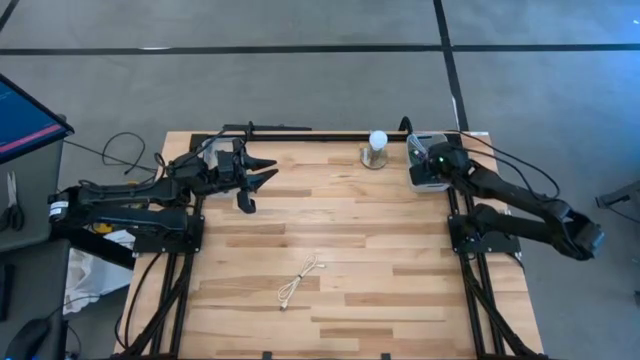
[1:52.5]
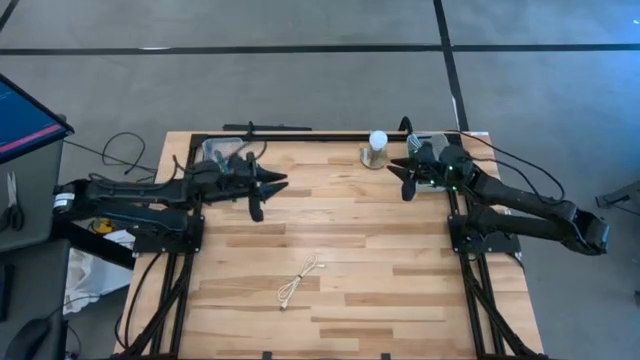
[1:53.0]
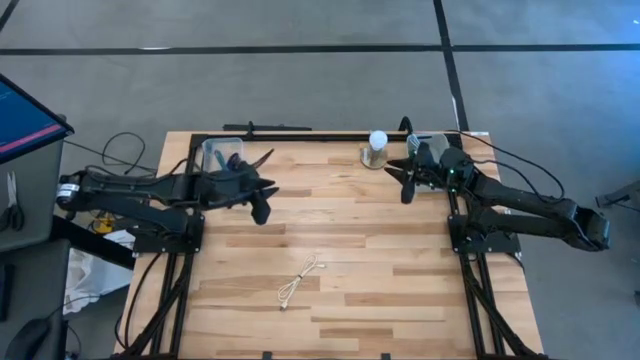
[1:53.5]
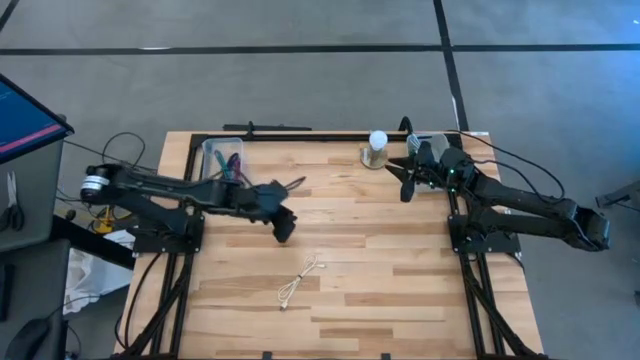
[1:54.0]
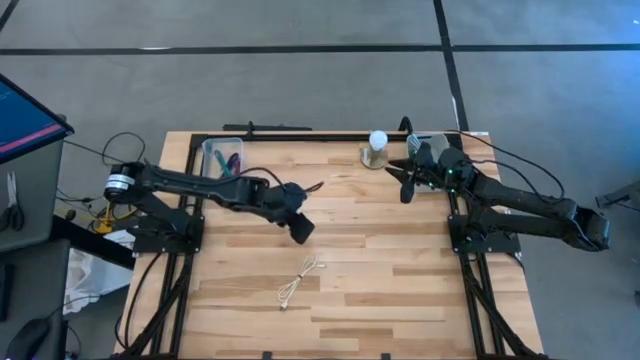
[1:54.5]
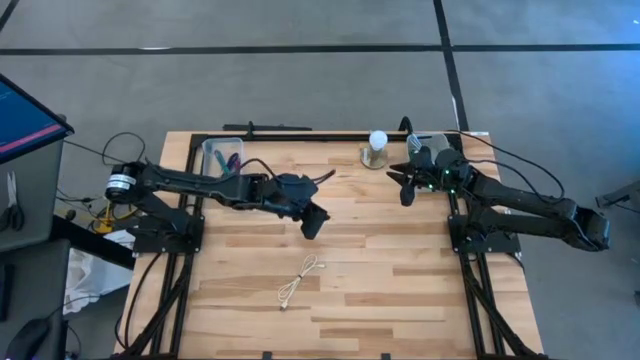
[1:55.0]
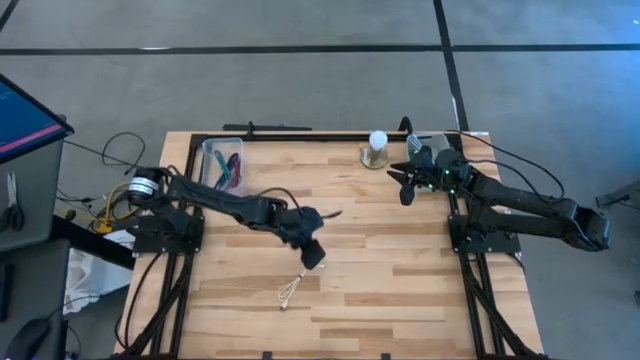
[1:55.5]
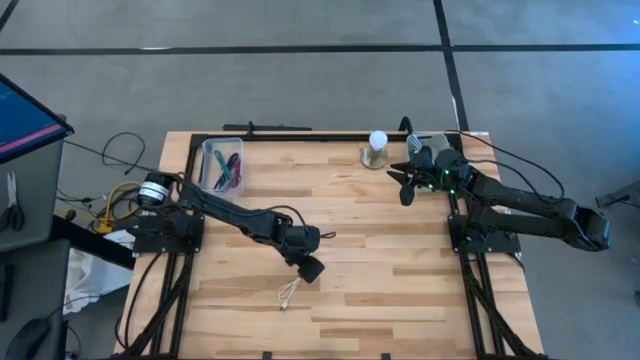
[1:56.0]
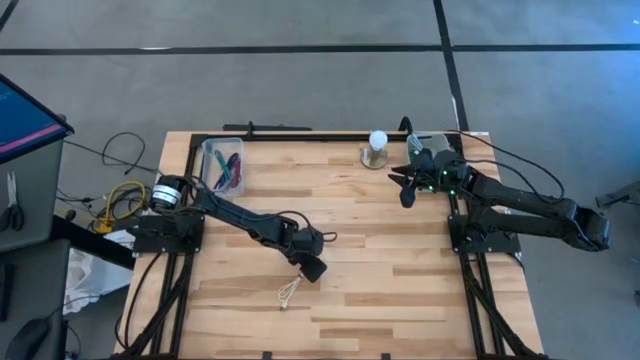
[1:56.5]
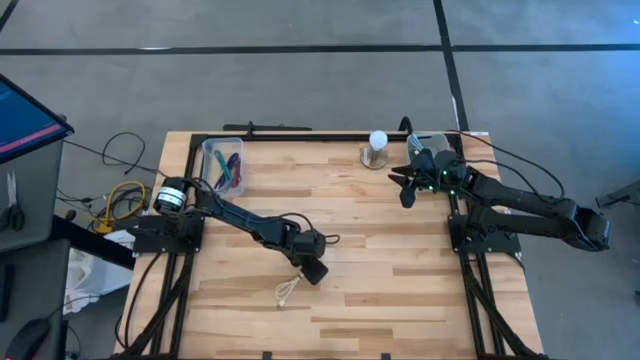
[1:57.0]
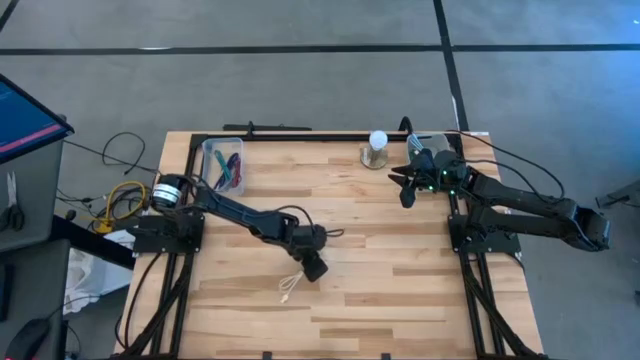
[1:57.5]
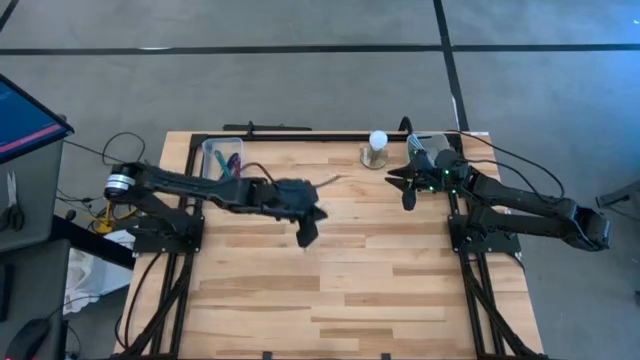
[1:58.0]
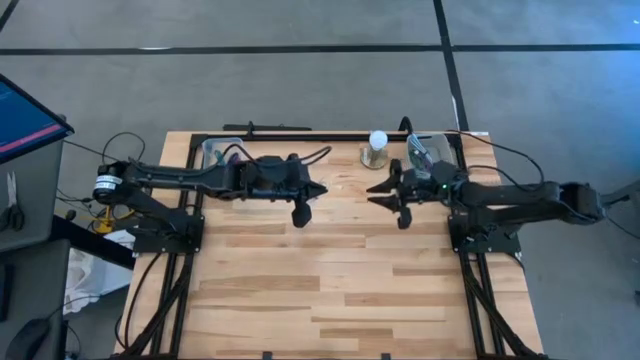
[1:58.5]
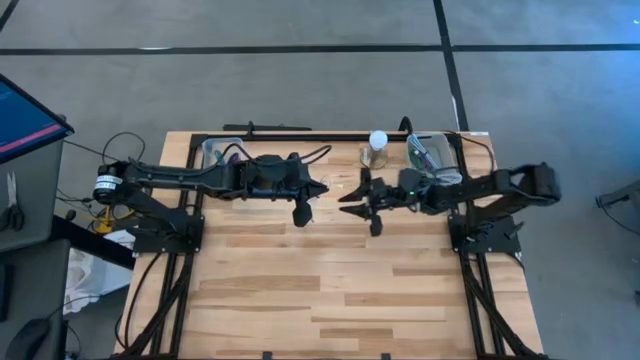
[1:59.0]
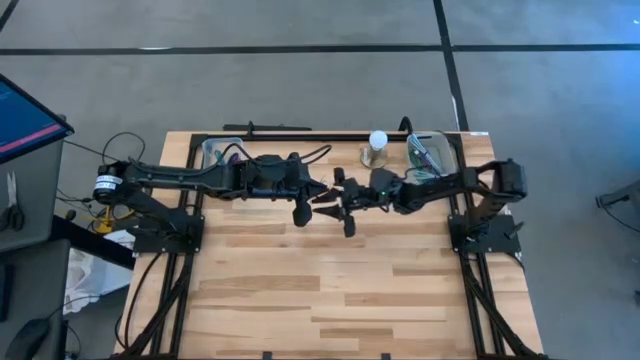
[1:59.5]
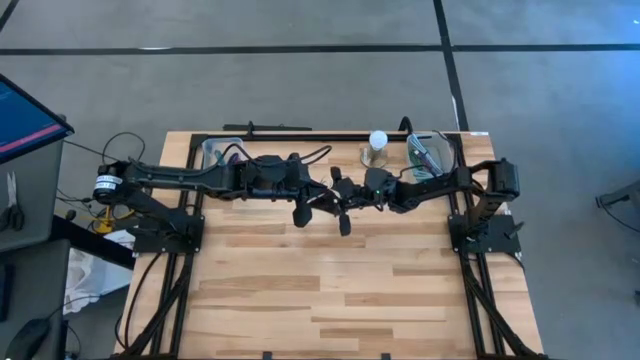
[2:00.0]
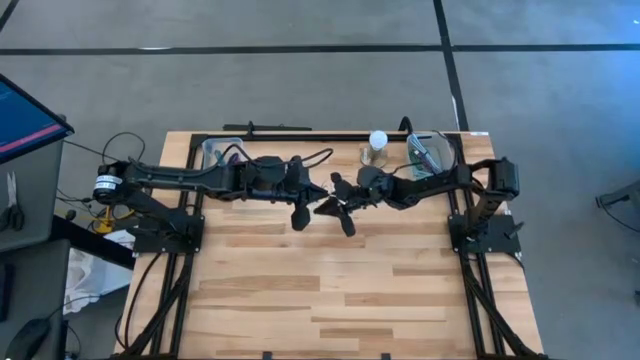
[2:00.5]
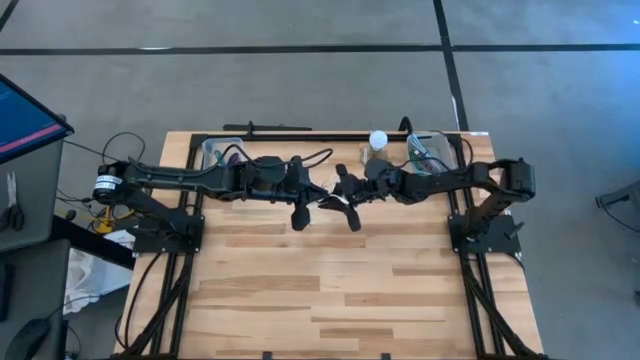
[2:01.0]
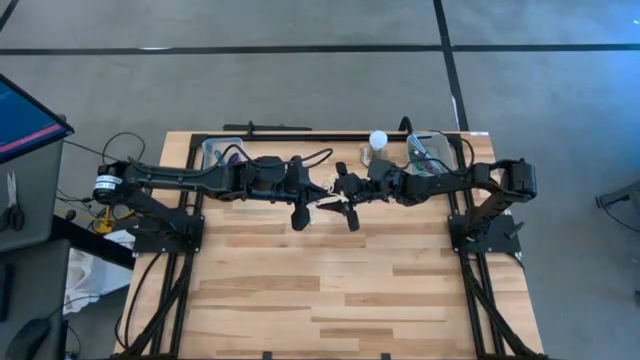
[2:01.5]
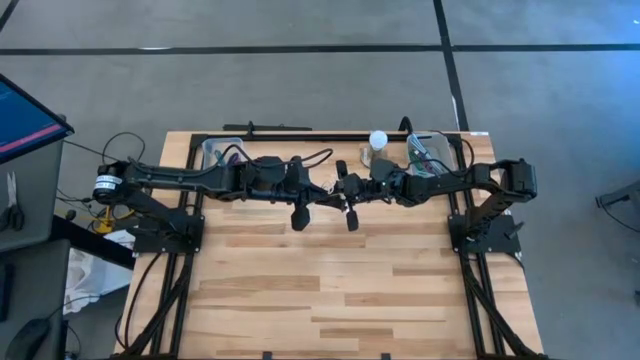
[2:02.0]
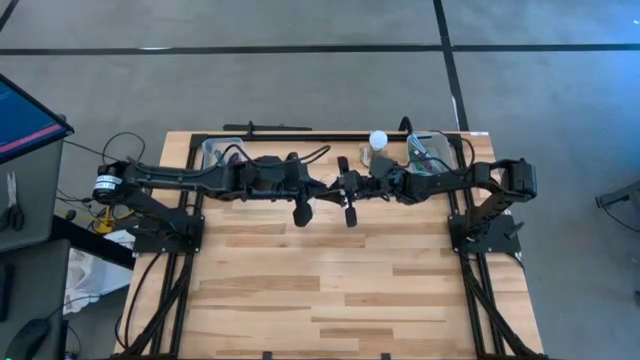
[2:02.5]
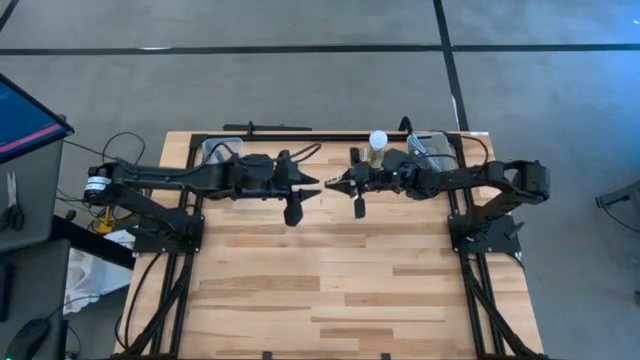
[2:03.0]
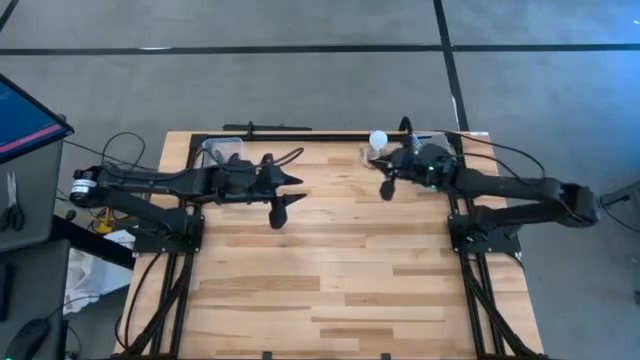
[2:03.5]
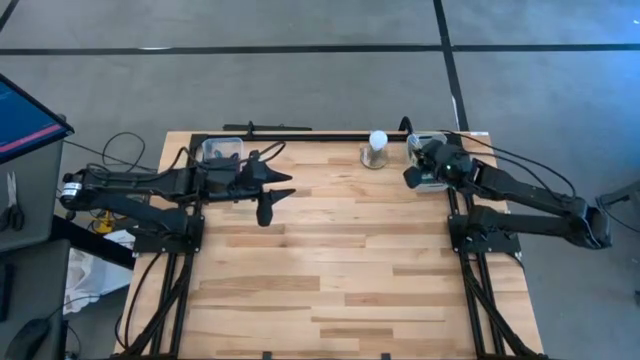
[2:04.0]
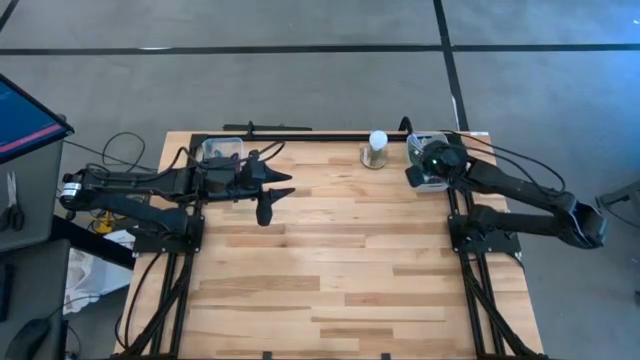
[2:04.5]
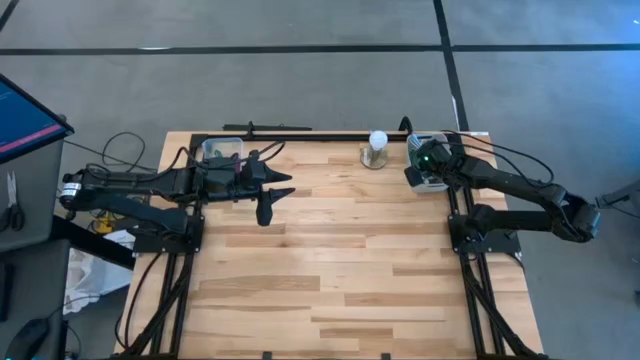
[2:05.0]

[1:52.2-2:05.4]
Task: Pick & Place USB Port
Put the white charger cable into the gray bin

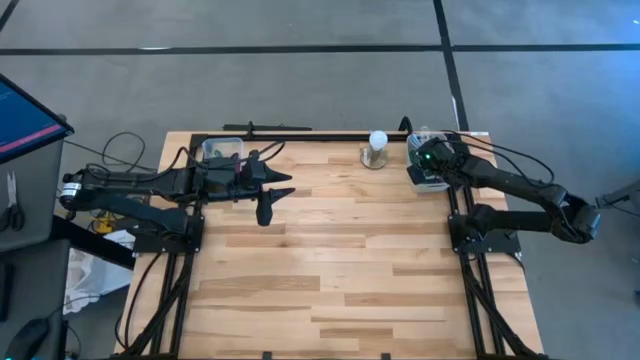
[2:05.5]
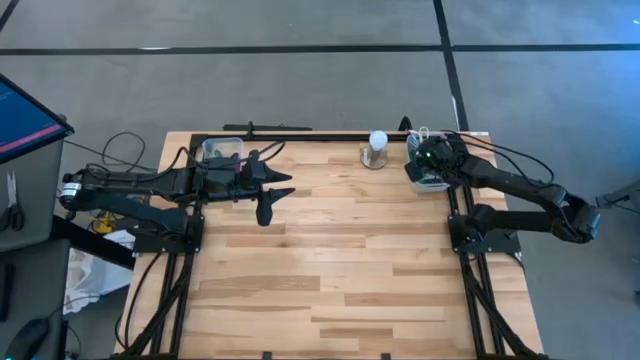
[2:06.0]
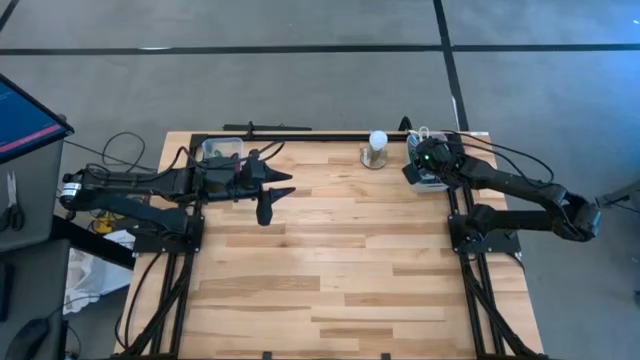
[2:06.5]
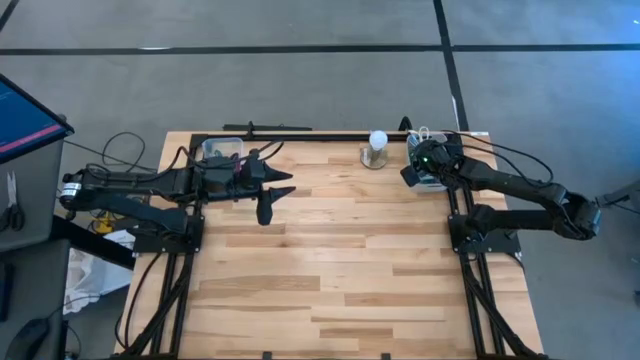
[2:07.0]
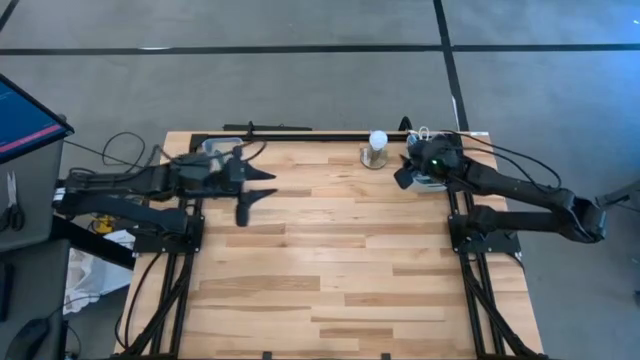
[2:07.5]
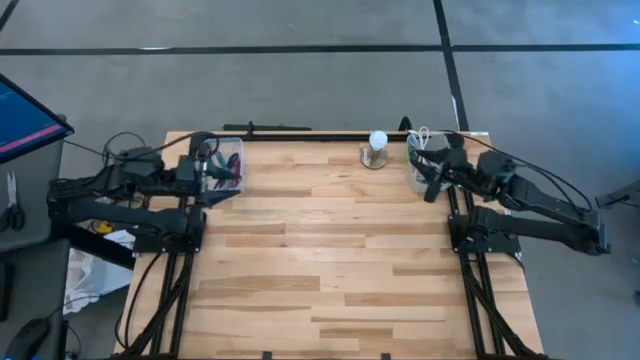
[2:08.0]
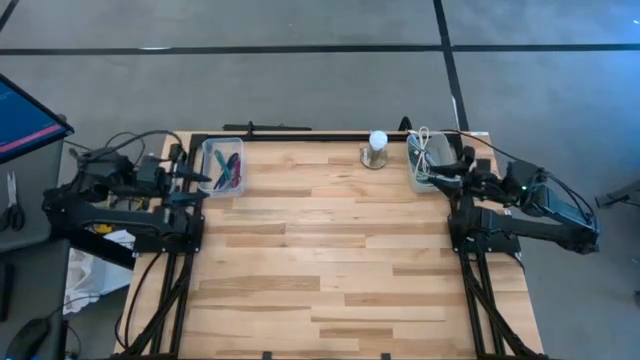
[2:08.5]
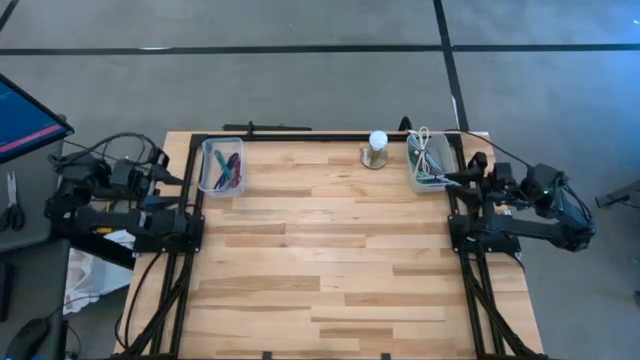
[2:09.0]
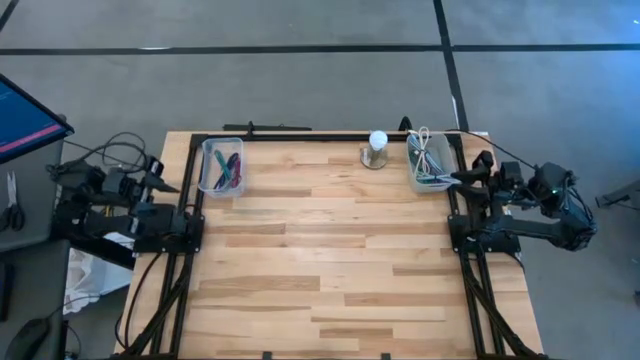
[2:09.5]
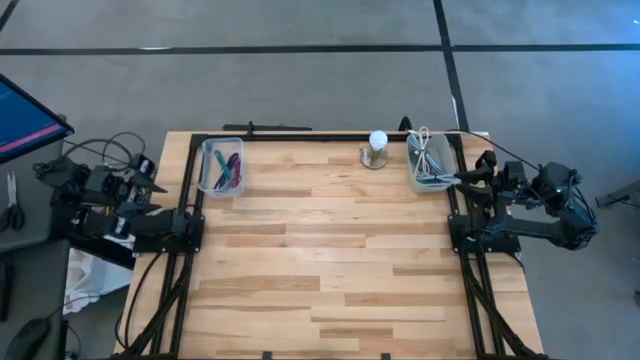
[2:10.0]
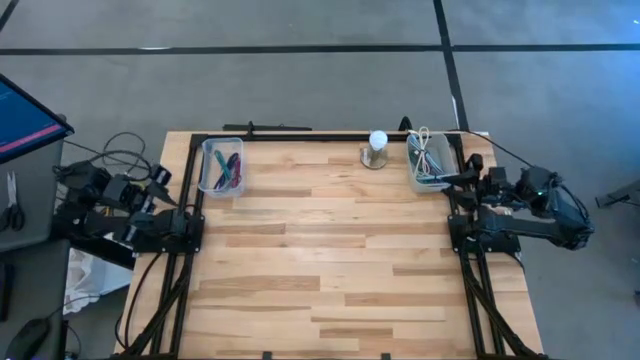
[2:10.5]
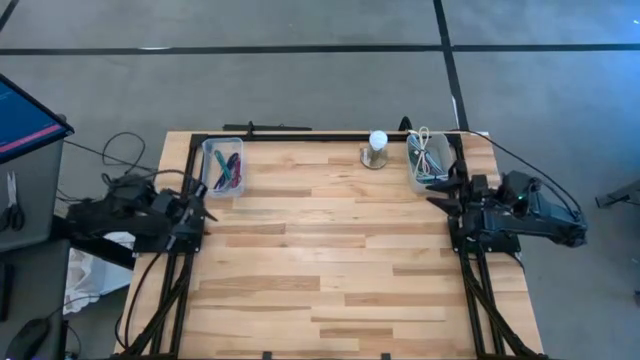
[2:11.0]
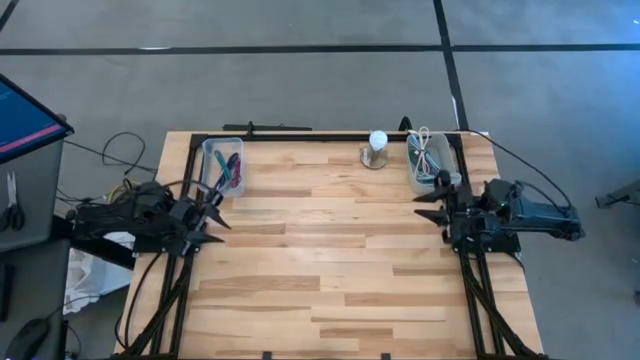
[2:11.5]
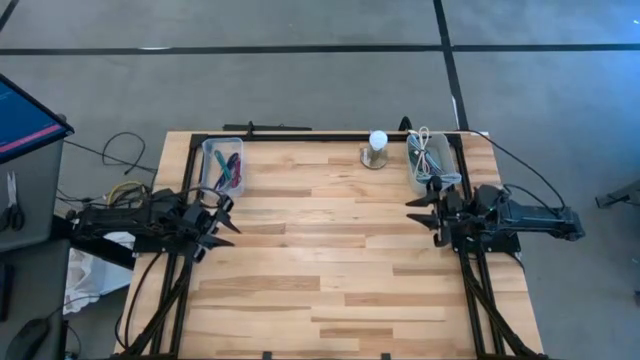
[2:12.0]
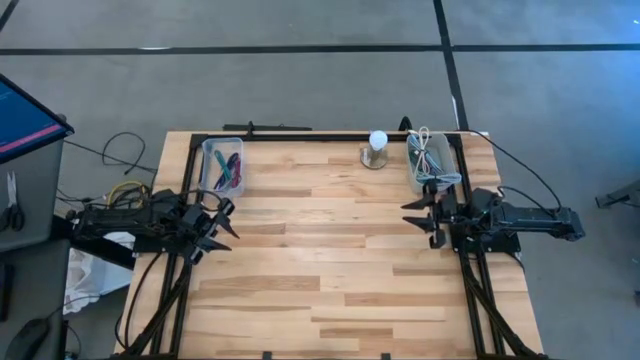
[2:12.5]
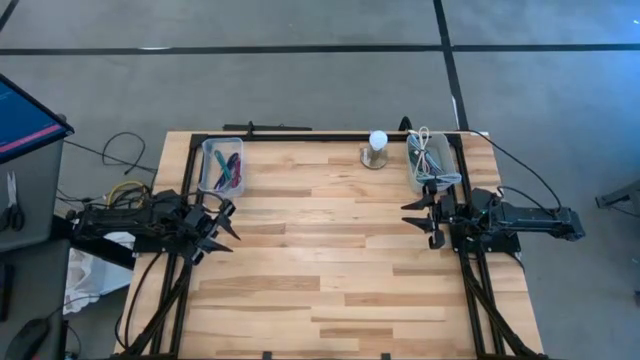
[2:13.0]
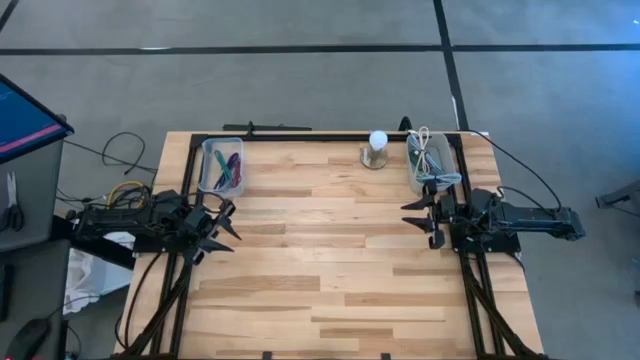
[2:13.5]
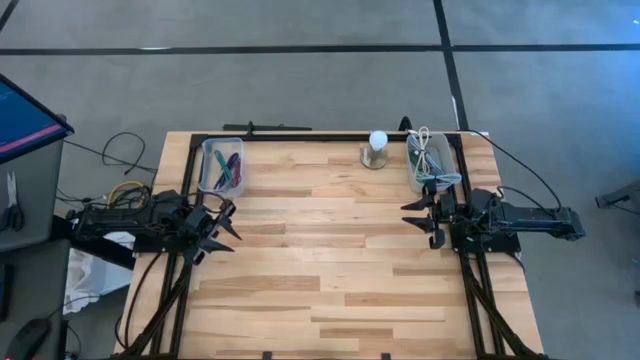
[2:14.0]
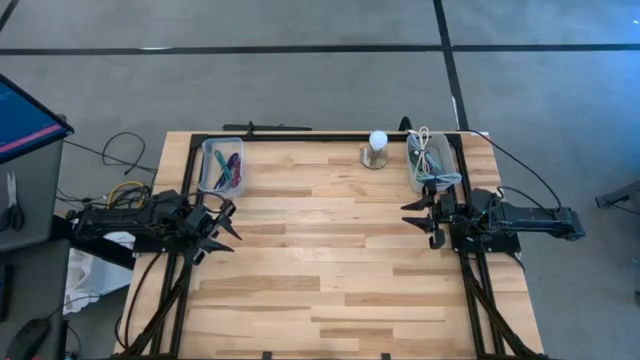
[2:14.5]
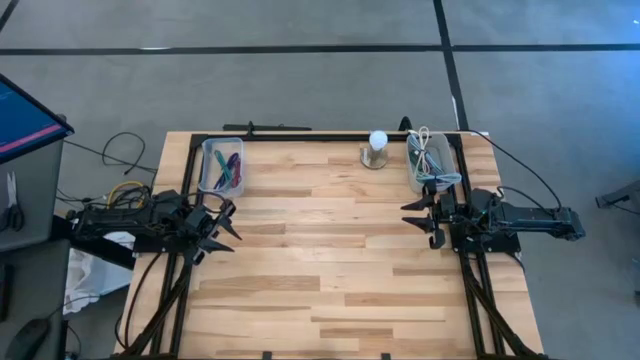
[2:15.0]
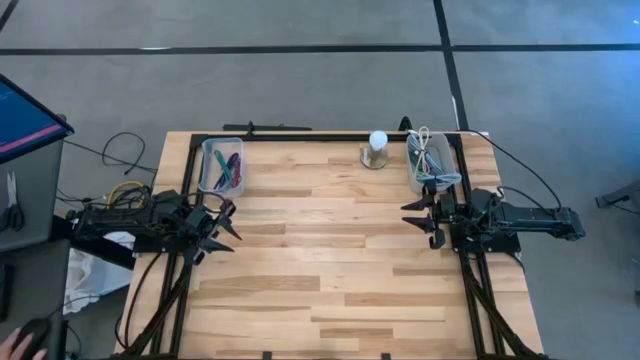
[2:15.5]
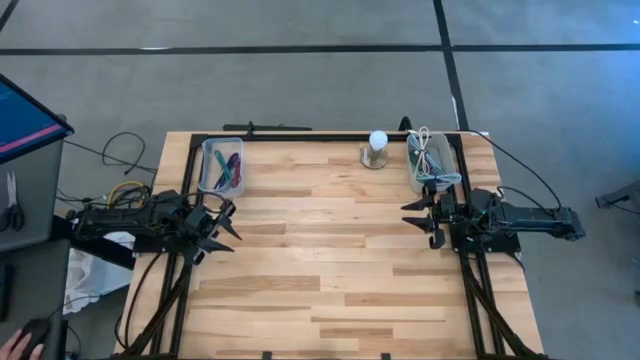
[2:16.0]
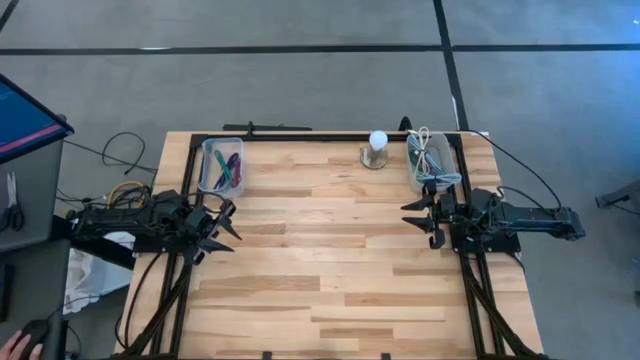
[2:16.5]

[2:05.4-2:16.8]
Return to Home Position
